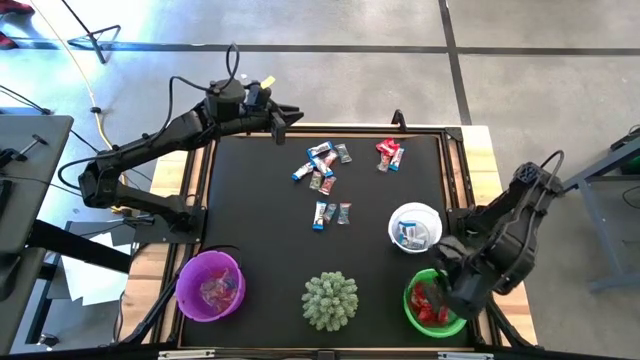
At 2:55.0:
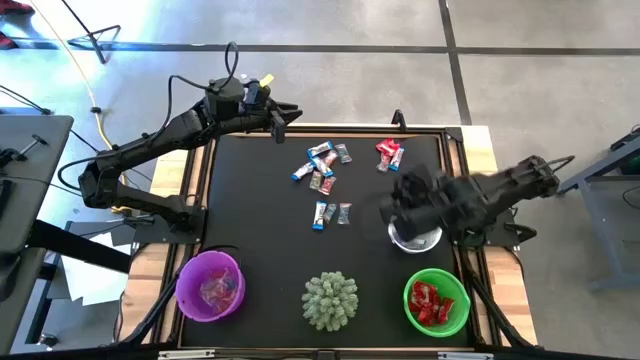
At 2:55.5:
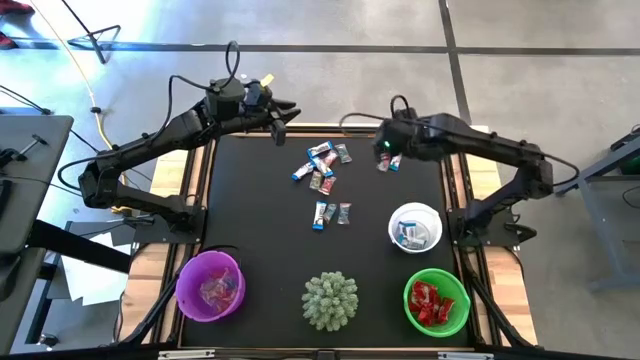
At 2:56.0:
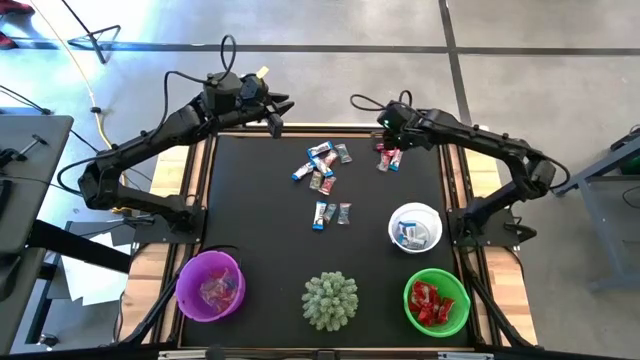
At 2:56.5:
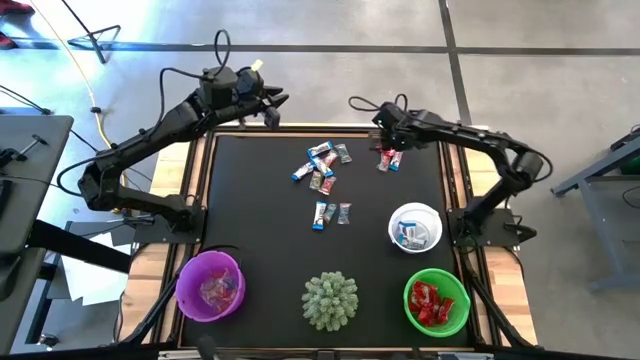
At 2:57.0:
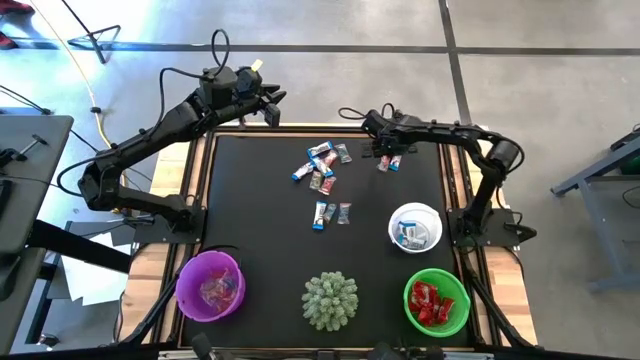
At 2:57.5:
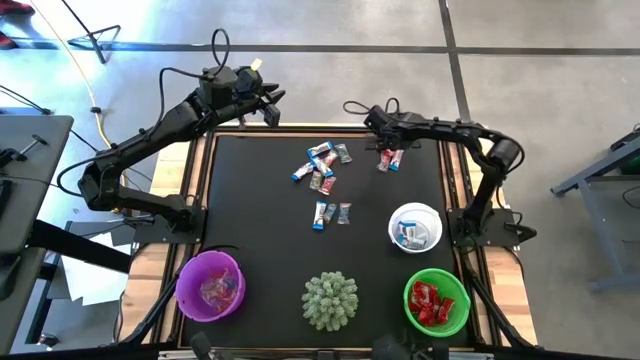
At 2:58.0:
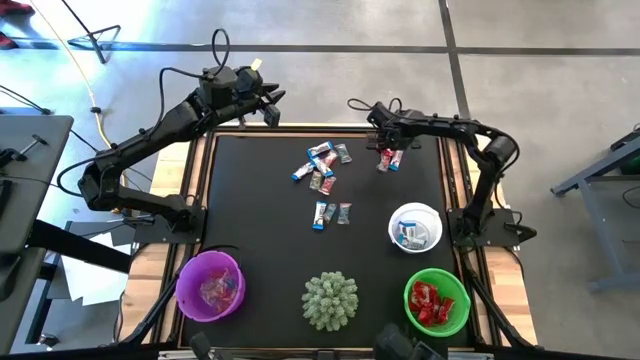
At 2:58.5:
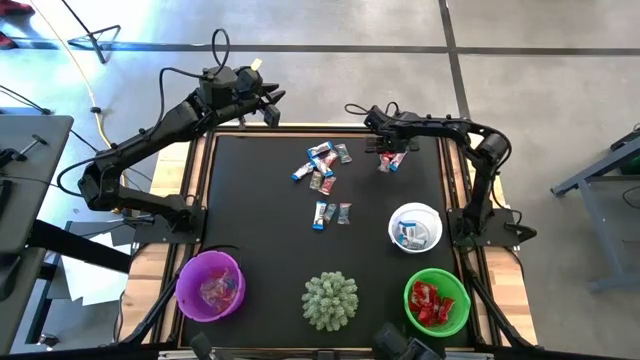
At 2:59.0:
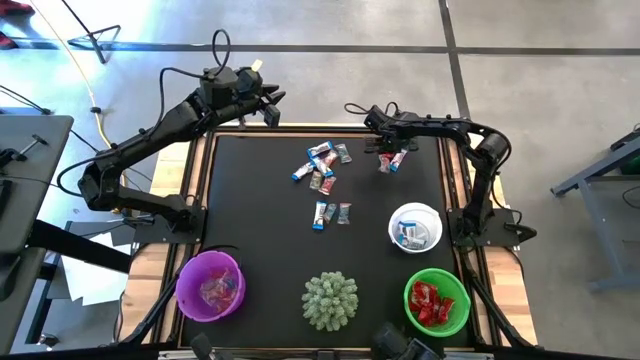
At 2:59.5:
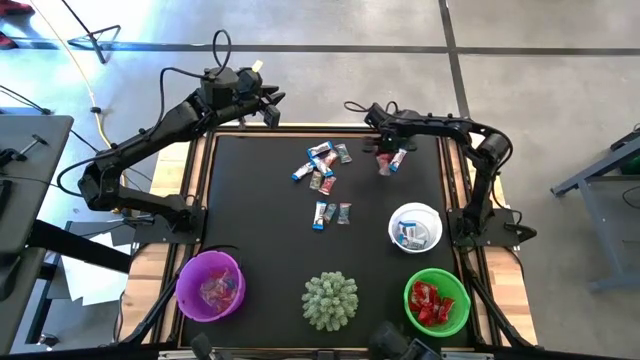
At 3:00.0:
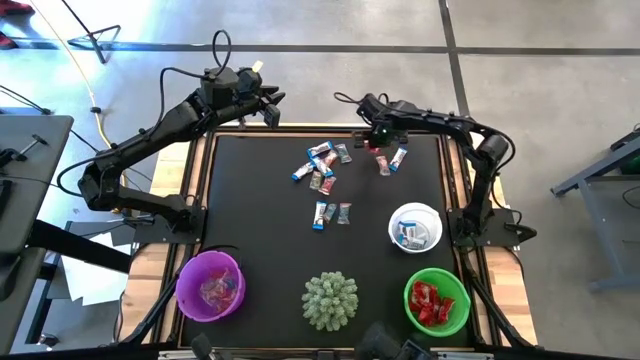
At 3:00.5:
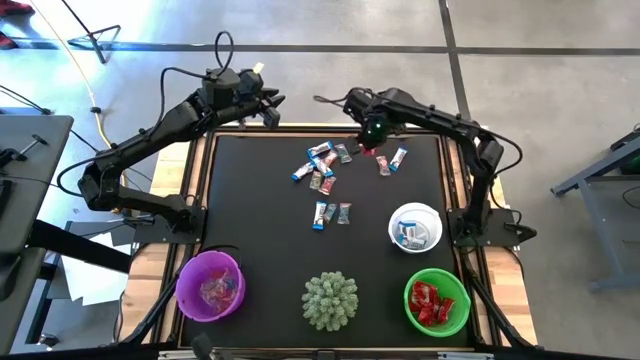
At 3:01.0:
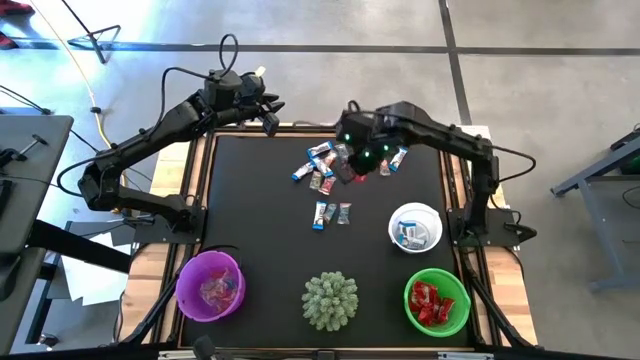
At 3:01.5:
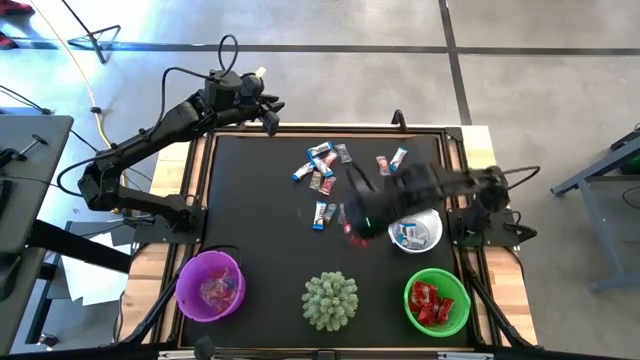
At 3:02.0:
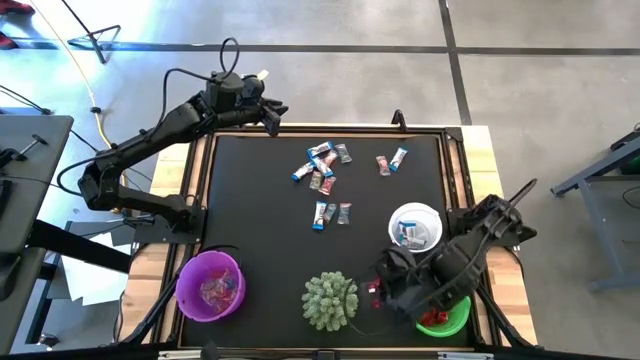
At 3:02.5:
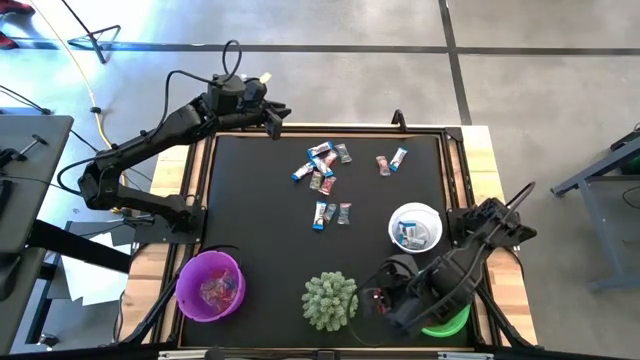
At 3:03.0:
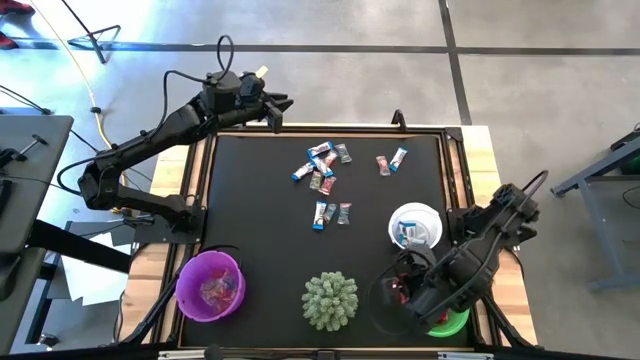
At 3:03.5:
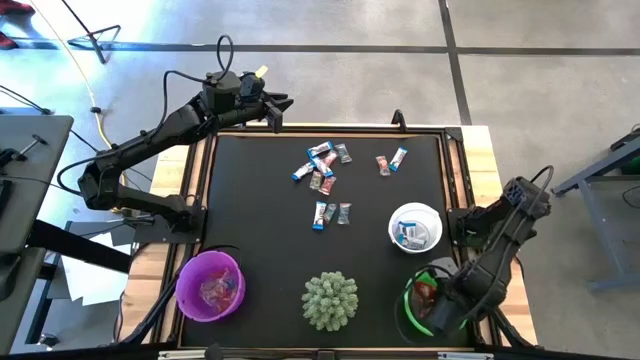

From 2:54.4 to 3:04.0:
Task: Sort candy
Put the red candy wrapper into the green bucket

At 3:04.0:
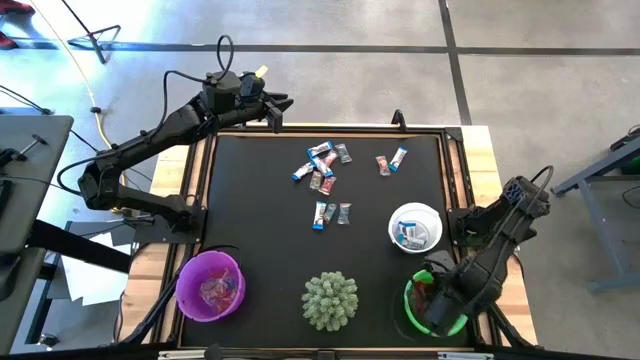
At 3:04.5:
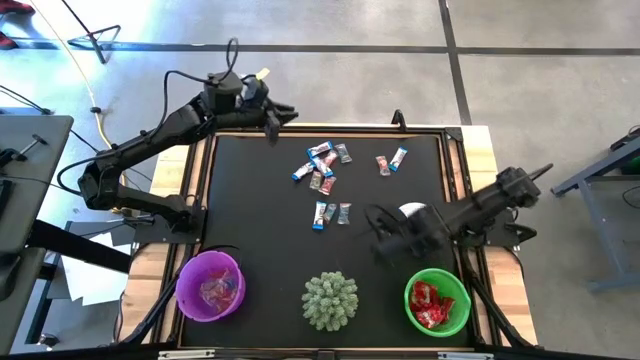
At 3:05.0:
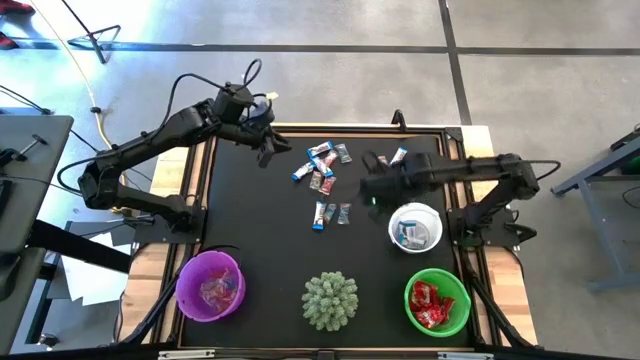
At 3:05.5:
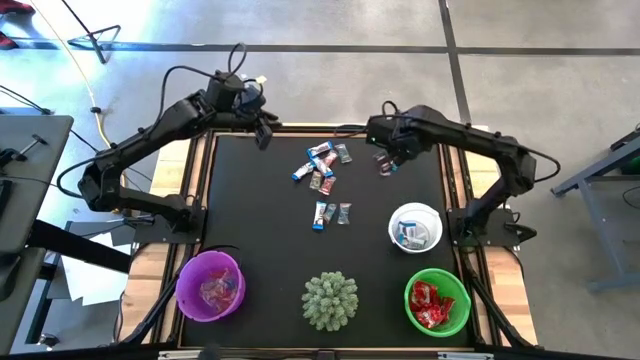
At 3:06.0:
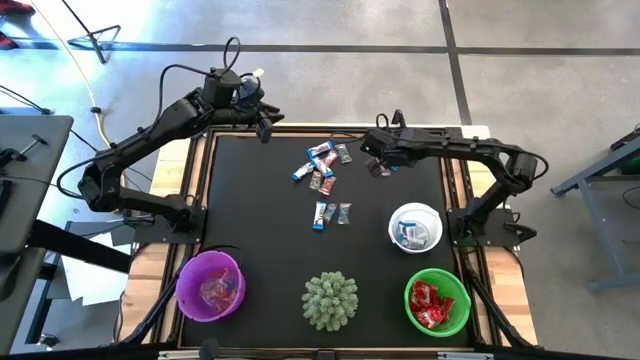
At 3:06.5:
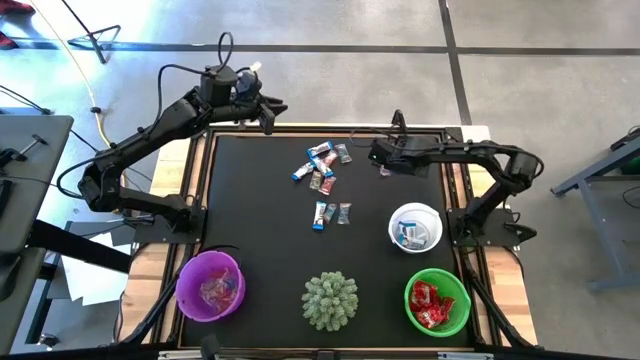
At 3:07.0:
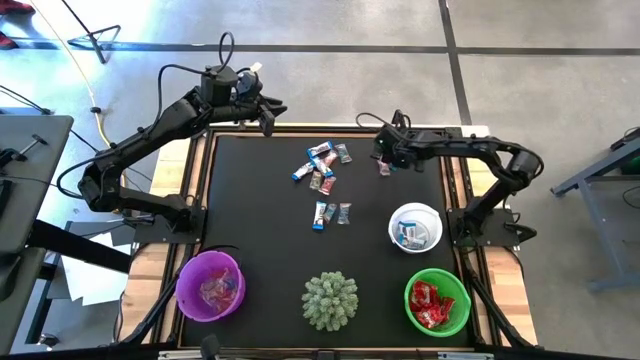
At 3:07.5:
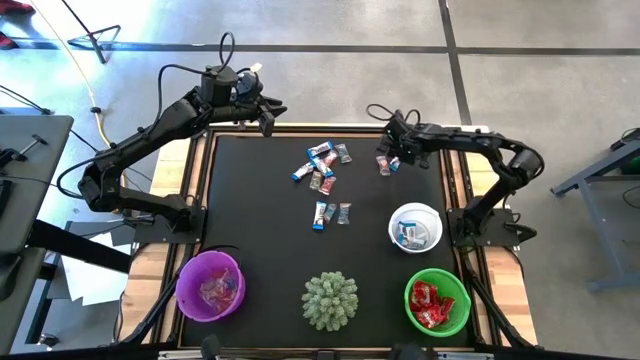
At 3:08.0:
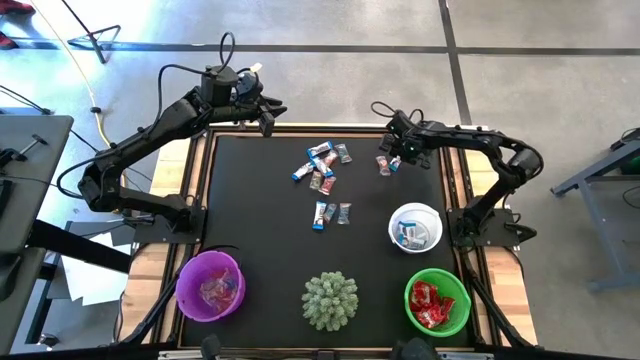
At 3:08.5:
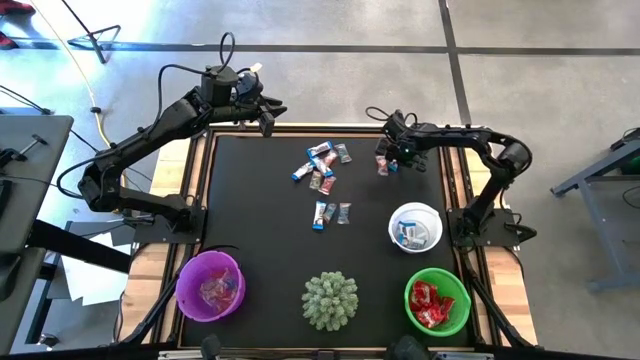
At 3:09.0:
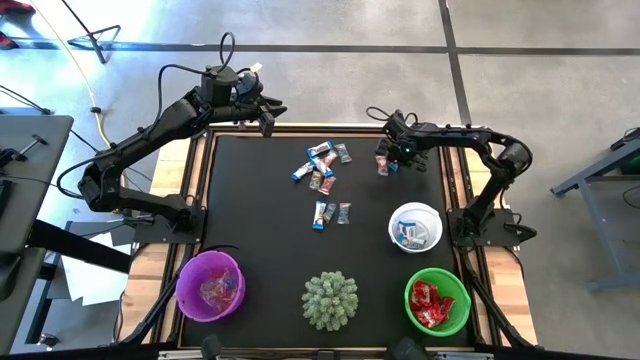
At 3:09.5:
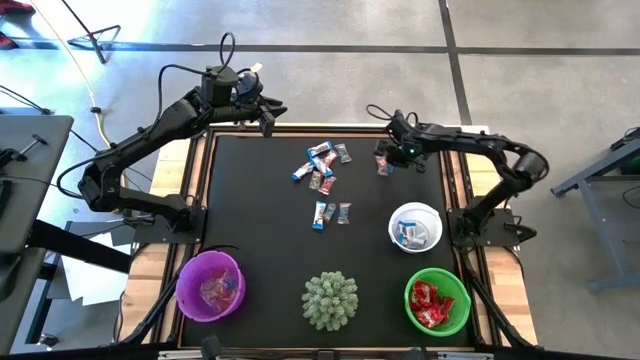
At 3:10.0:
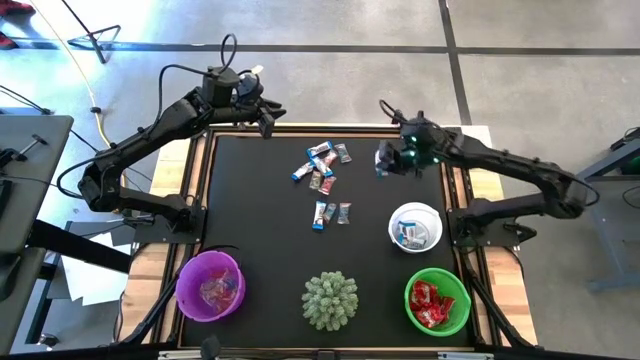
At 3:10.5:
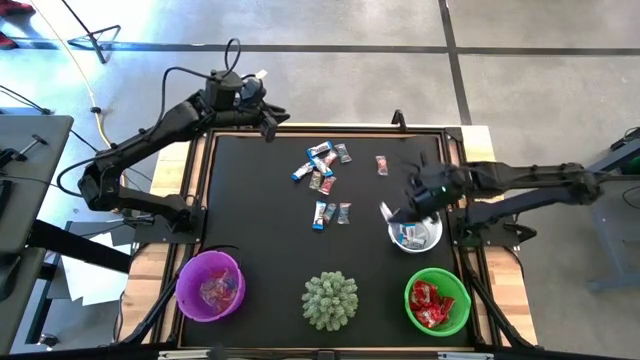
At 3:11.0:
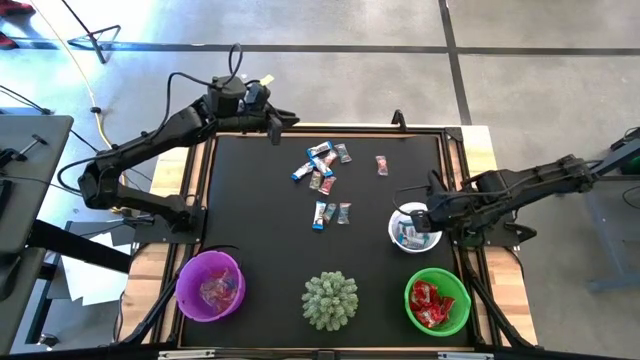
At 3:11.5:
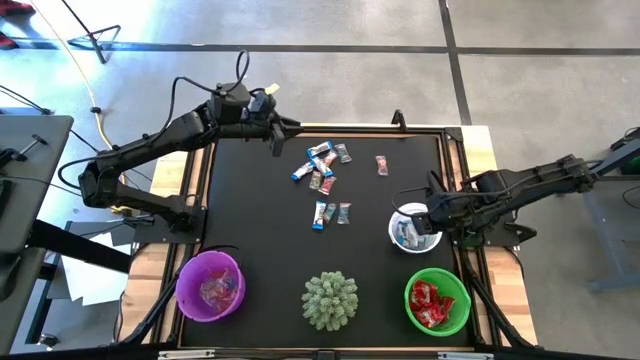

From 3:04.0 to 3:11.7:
Put the white candy wrapper into the white bucket

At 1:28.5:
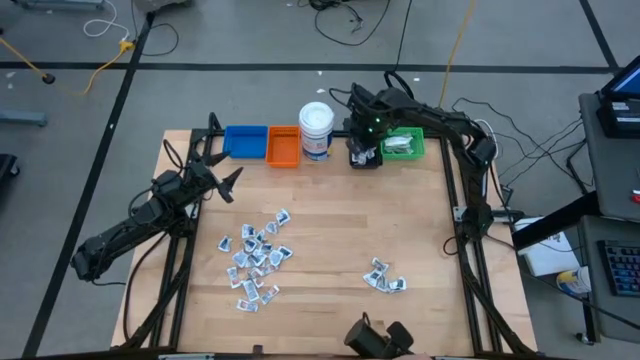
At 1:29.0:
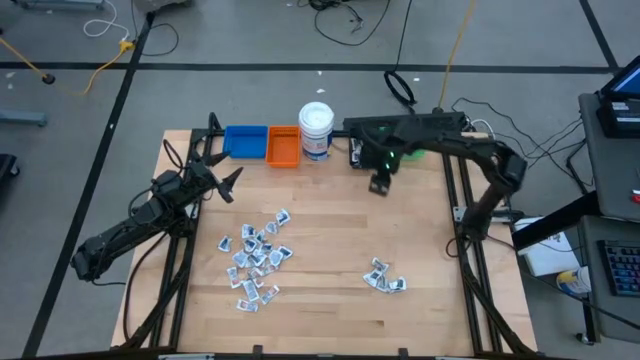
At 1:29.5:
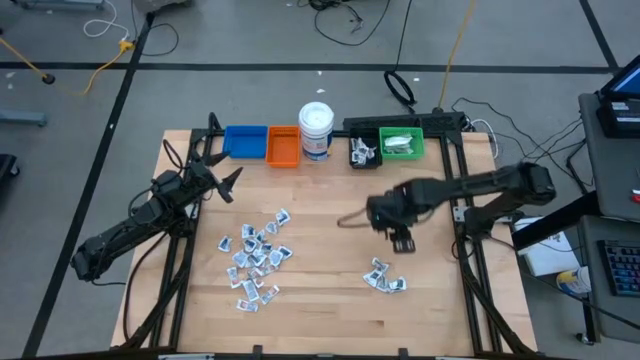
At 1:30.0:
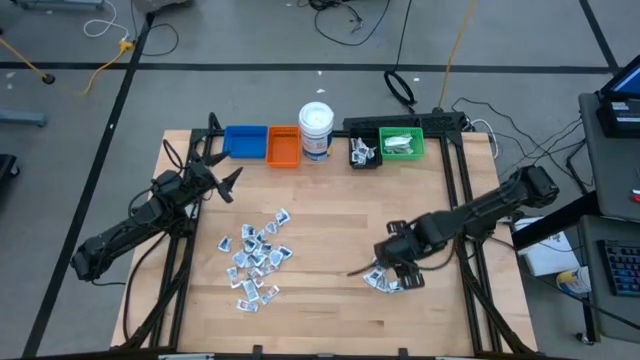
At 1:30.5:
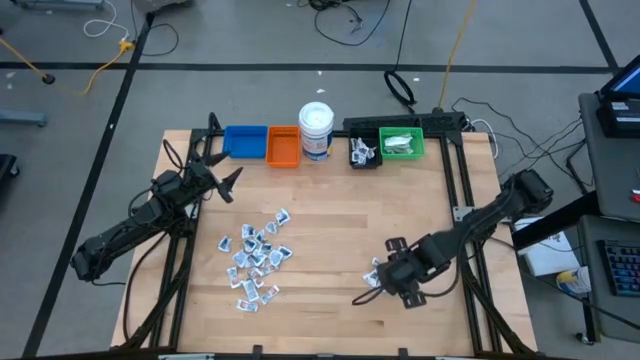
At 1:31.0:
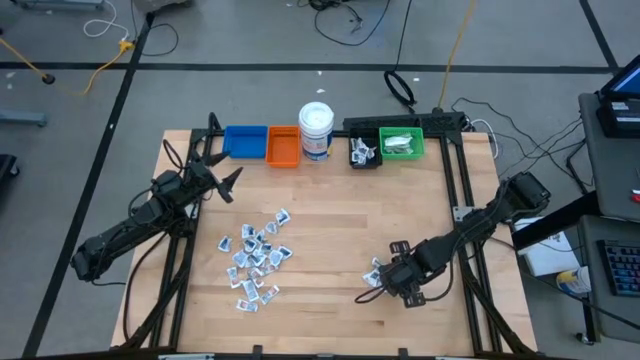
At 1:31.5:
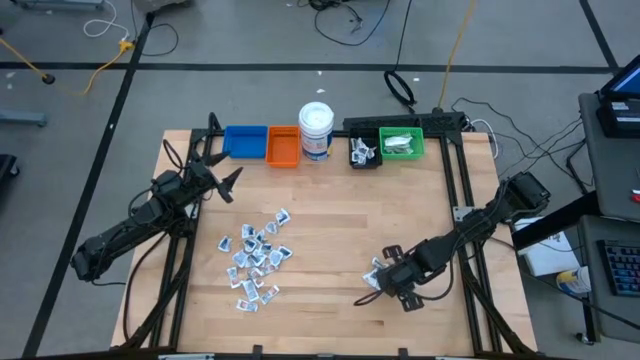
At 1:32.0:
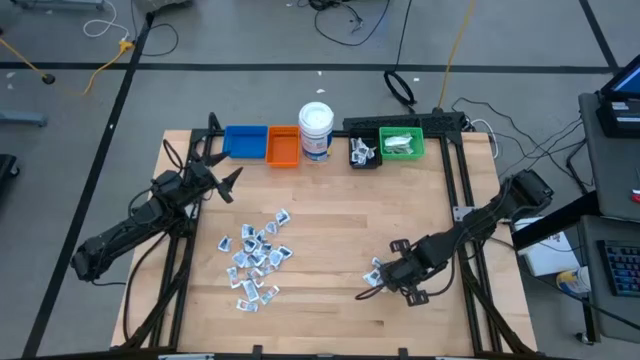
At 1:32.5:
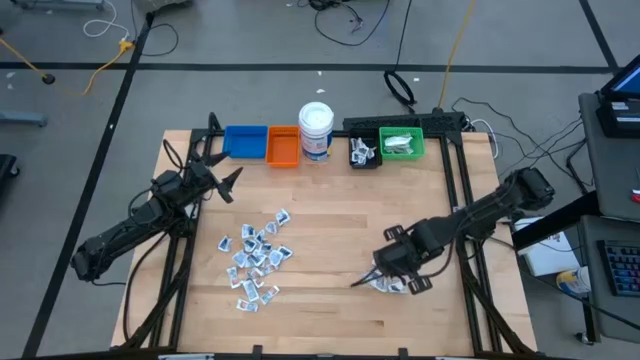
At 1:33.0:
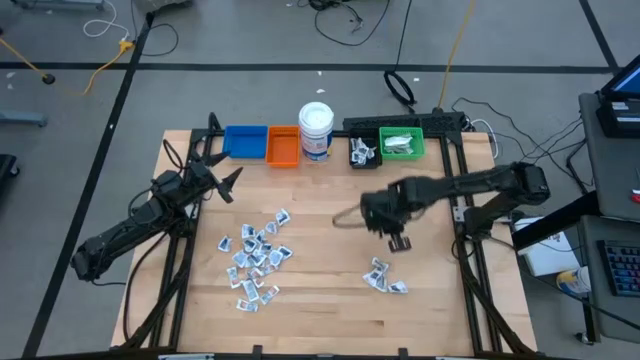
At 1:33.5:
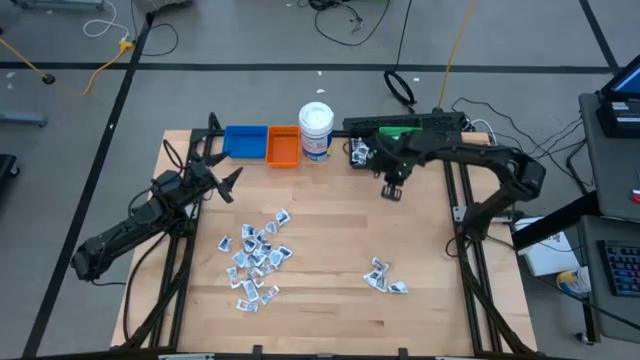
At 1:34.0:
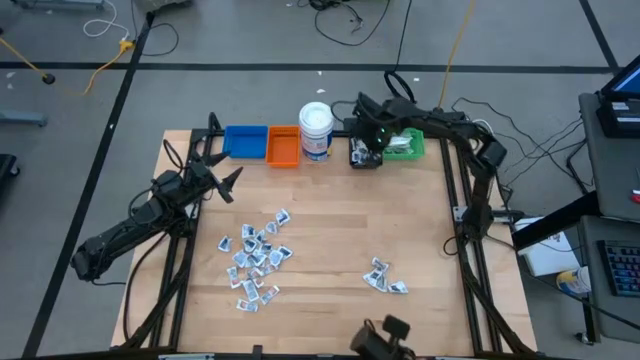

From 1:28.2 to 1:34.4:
Task: Pick & Place First Aid Supplies
Put the towelette pack into the black bin
